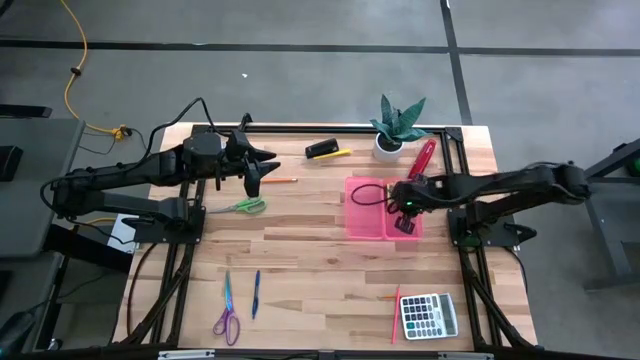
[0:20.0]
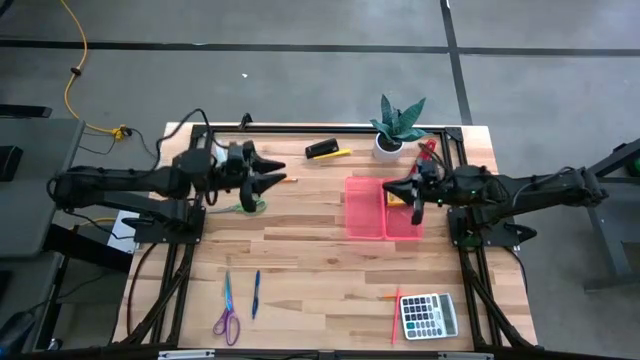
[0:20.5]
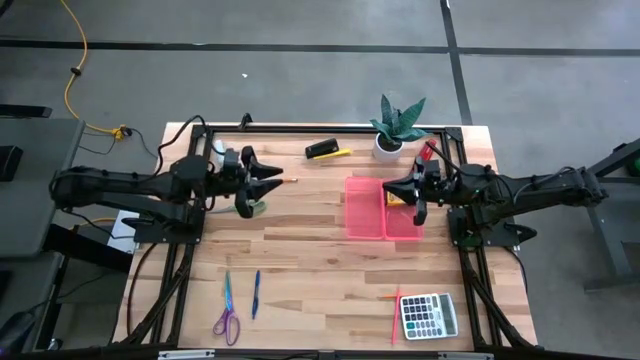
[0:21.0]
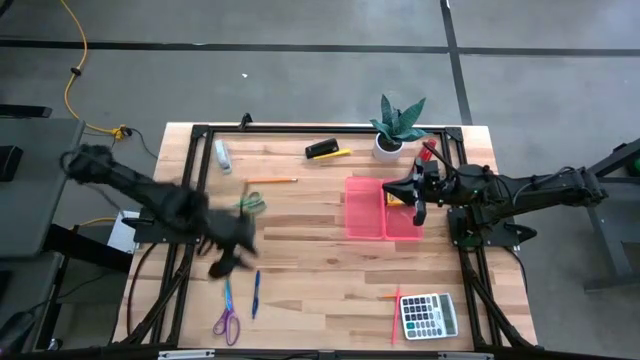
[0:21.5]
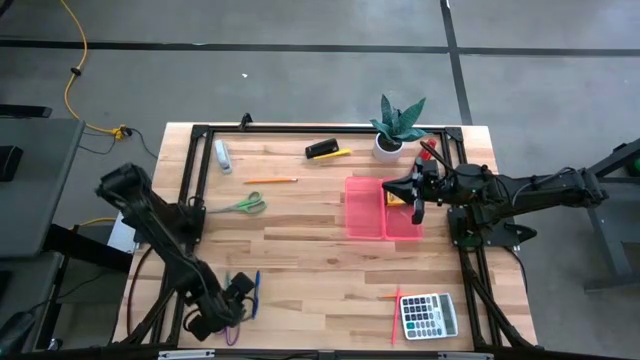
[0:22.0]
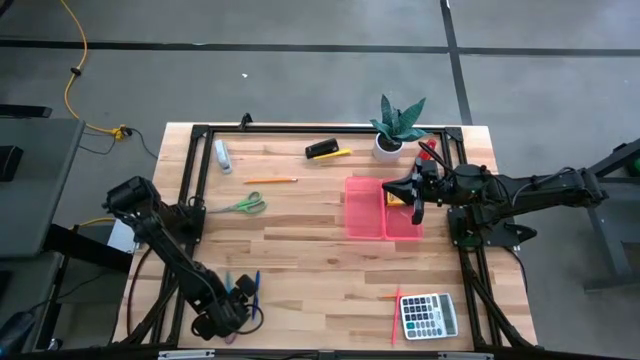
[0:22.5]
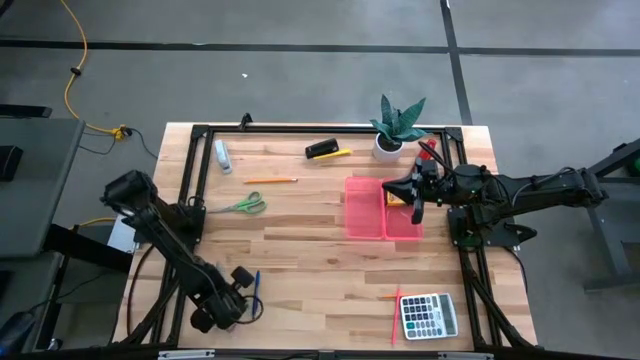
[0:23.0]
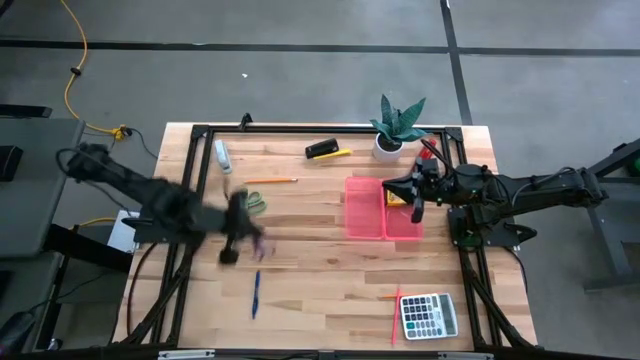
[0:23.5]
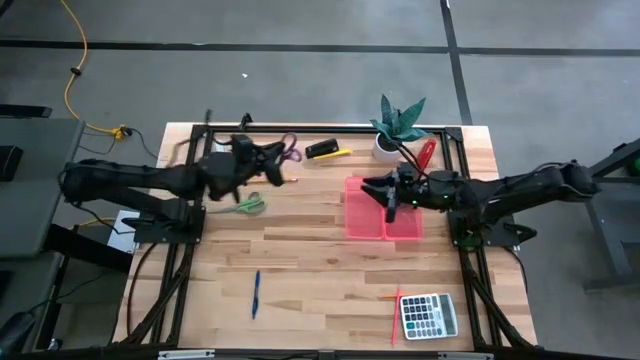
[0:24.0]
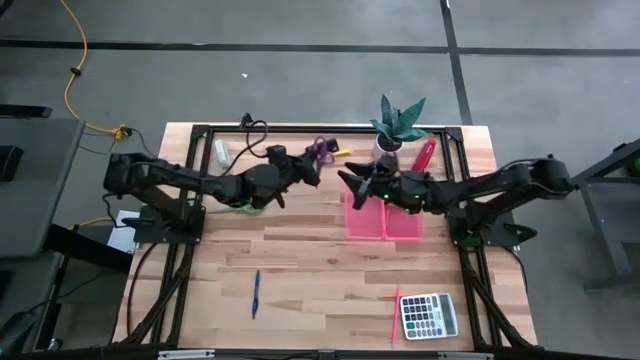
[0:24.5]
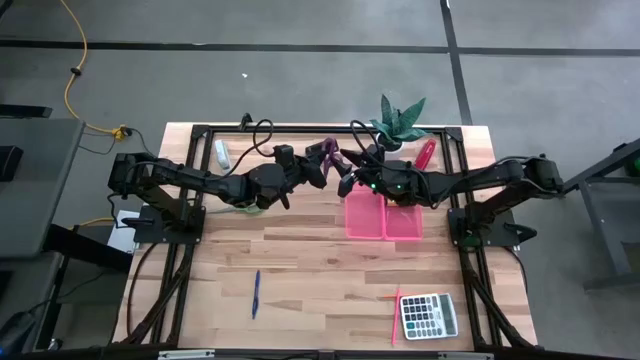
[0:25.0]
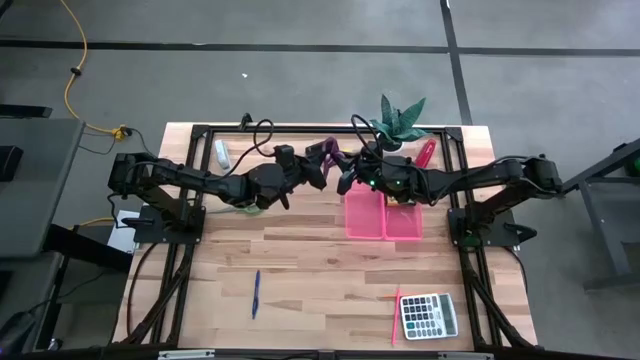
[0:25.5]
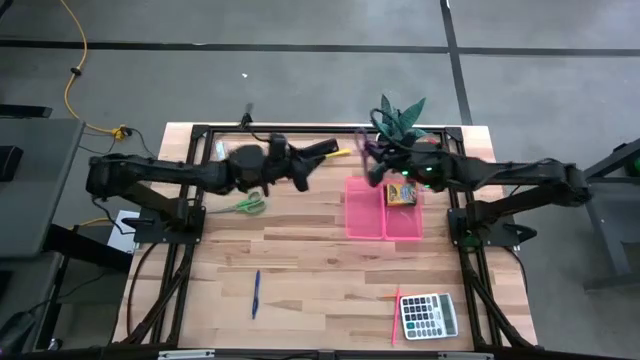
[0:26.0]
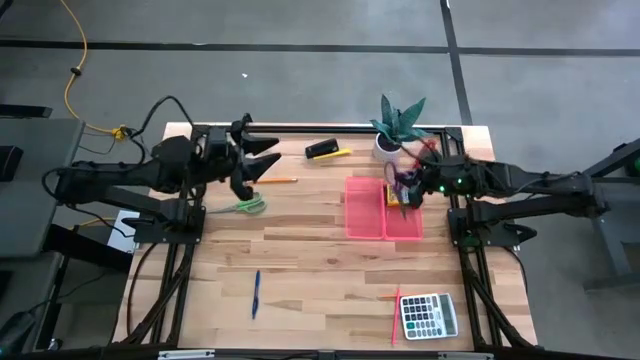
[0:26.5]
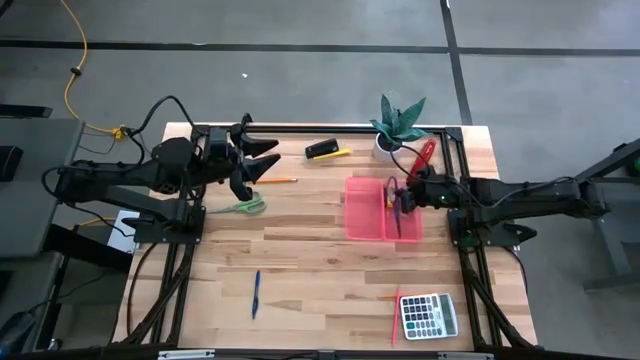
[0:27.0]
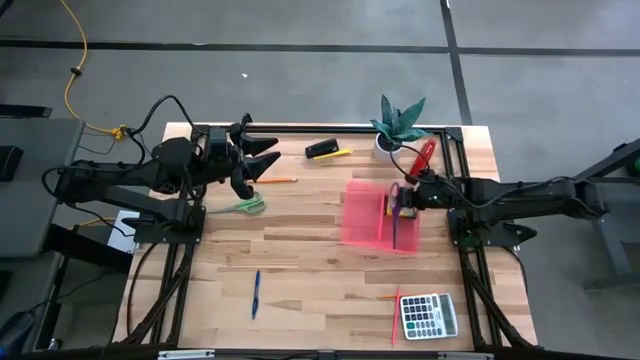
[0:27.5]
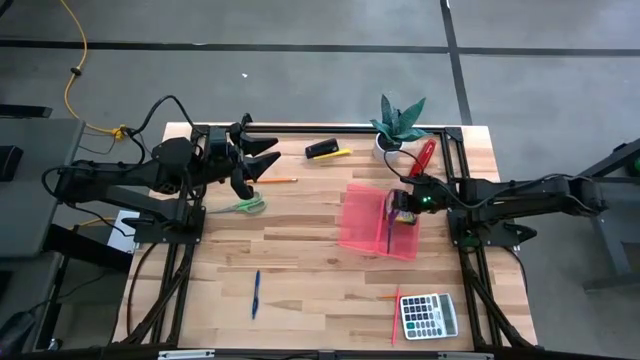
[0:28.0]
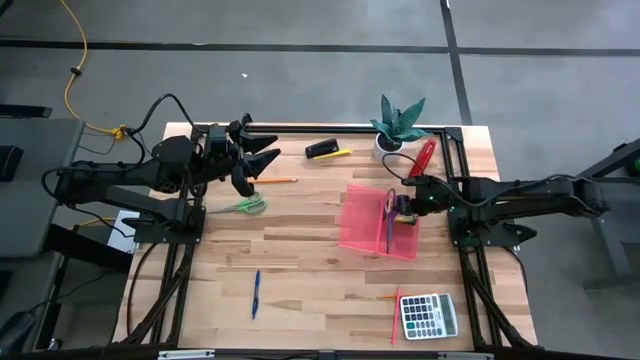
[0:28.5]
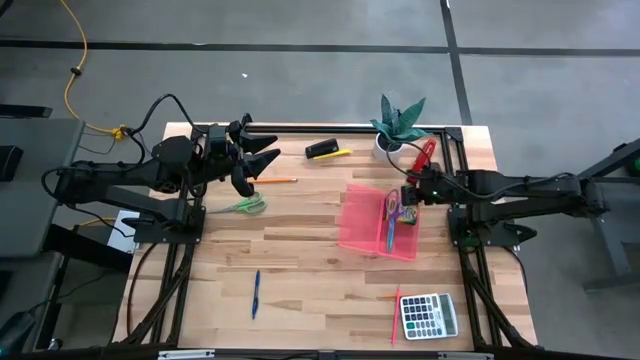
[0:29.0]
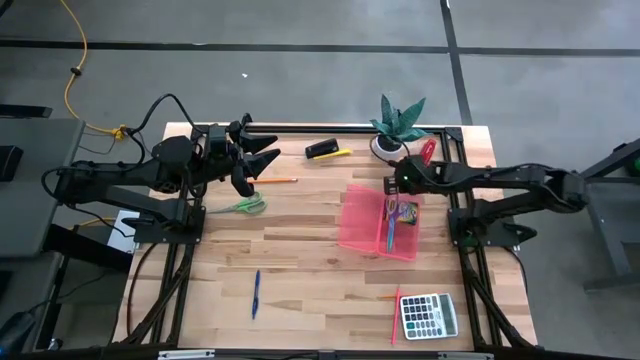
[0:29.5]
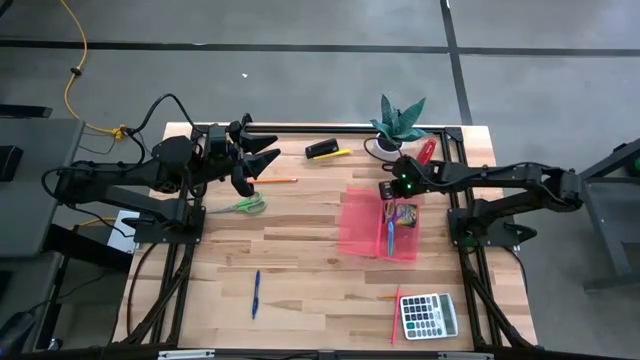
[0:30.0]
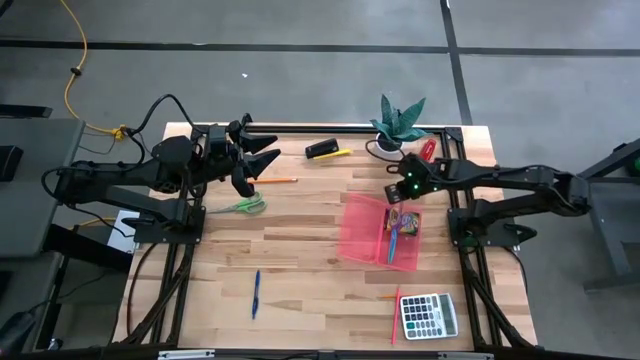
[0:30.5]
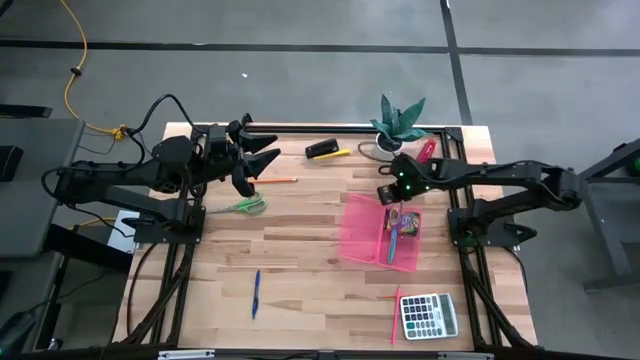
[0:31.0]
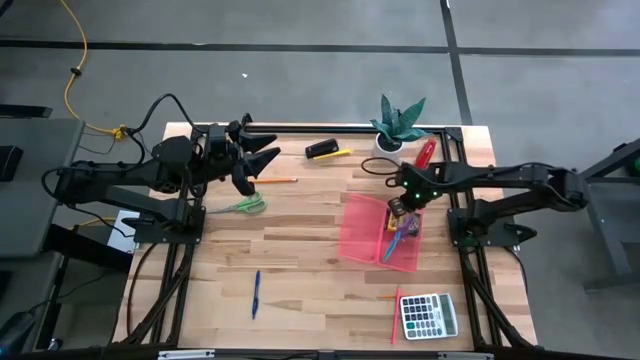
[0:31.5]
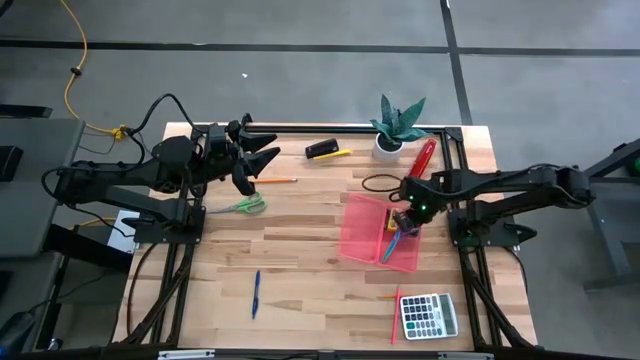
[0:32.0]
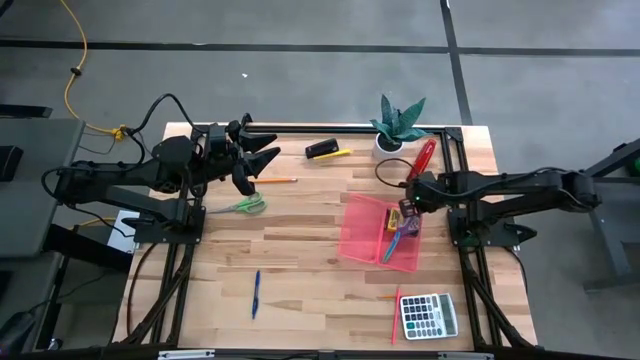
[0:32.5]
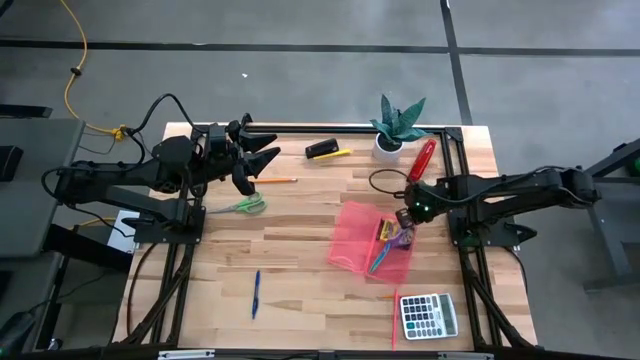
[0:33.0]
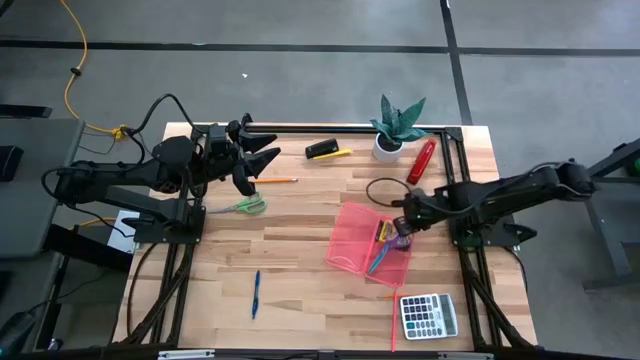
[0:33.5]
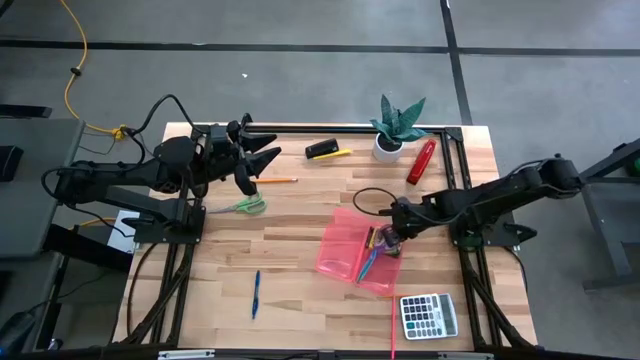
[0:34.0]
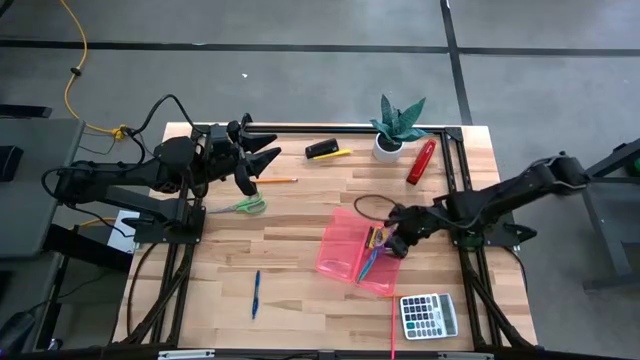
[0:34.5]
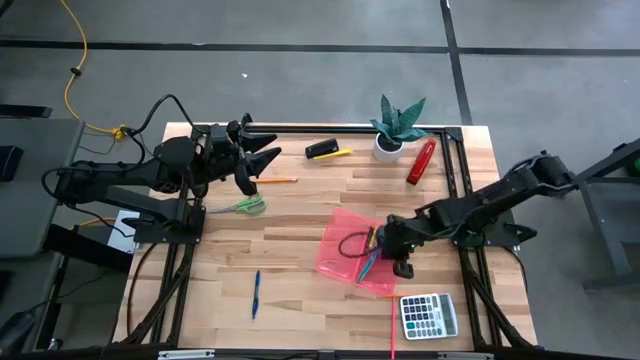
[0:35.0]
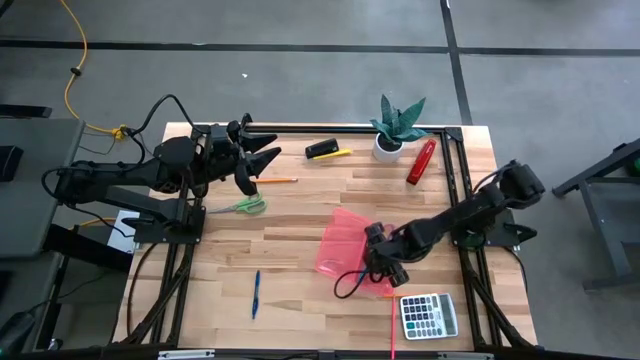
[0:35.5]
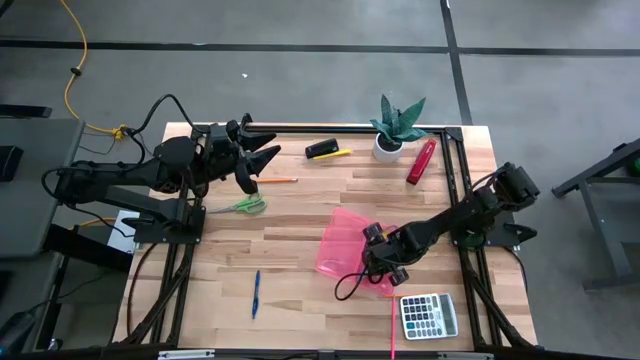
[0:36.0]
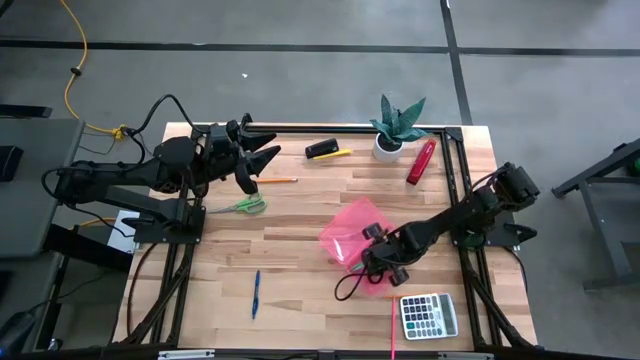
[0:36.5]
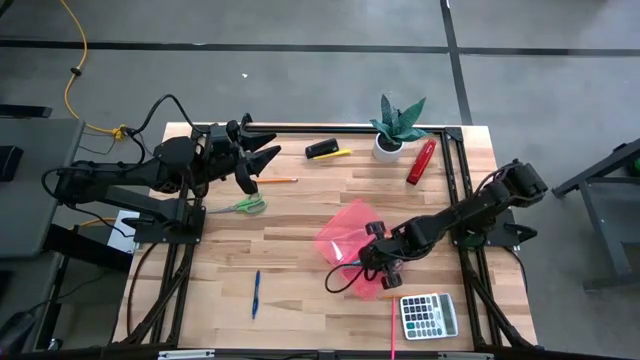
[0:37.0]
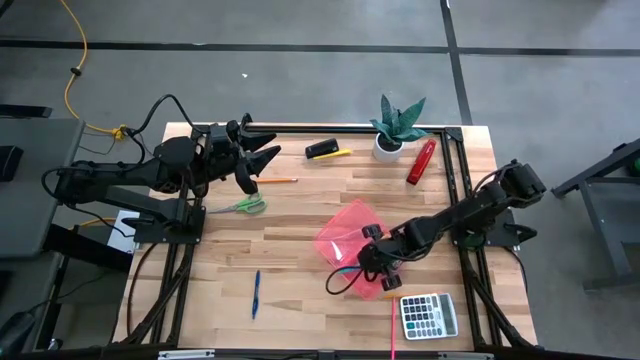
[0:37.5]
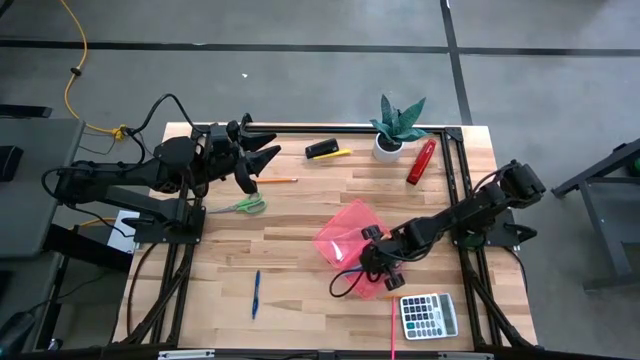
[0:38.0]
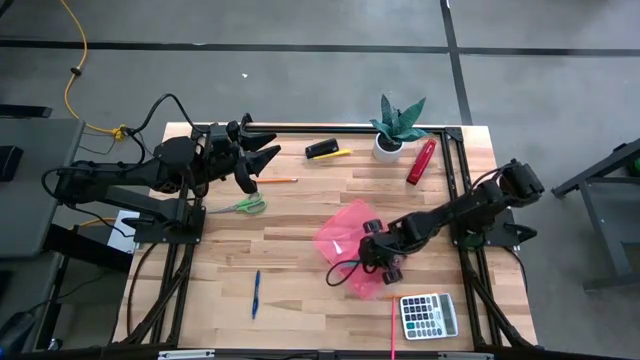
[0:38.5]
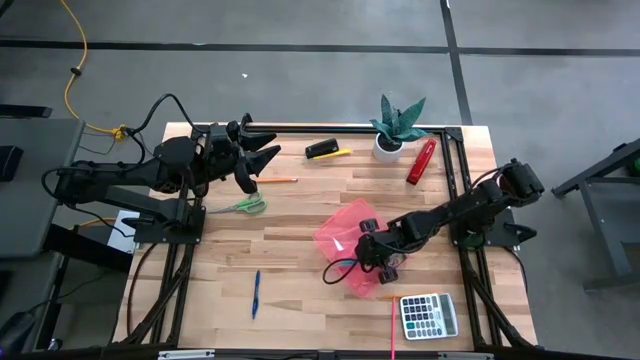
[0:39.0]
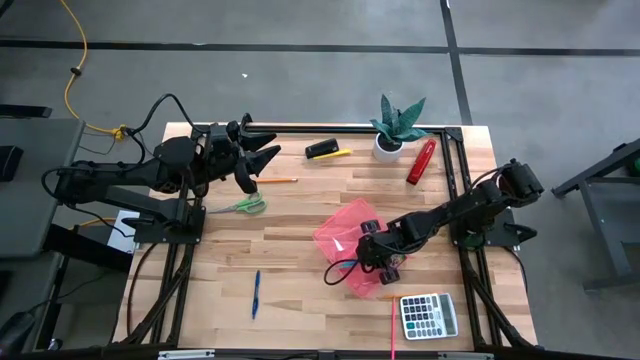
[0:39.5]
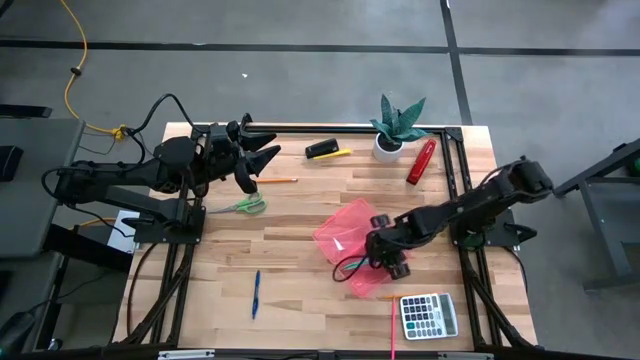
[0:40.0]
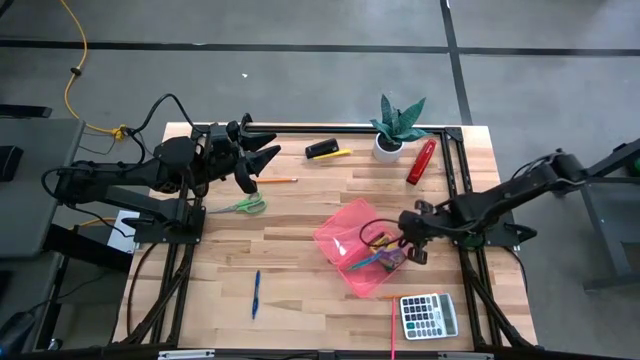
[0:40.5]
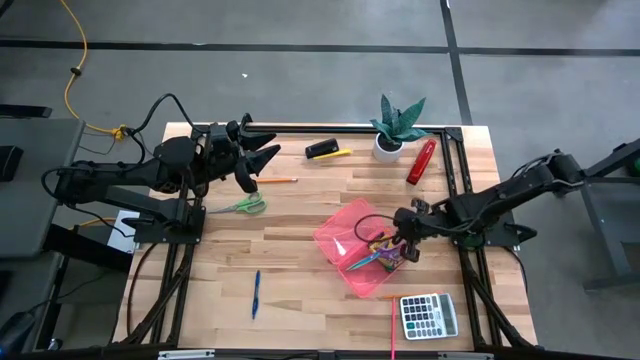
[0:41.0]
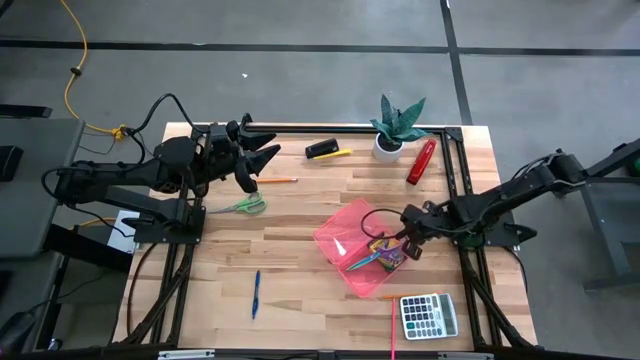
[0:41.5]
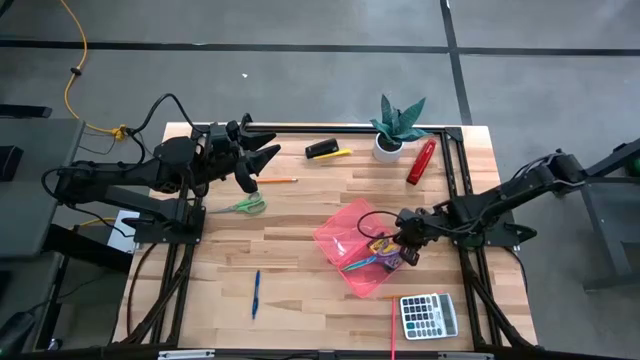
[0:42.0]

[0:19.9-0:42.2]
Task: Pack school essentials
Put the purple scissors into the pink supply box
